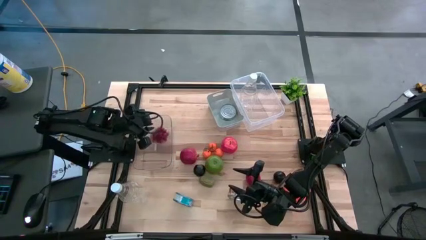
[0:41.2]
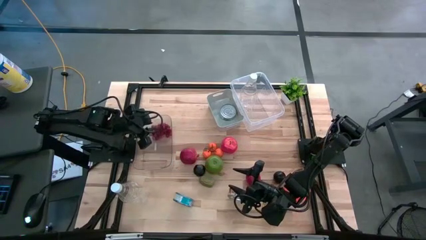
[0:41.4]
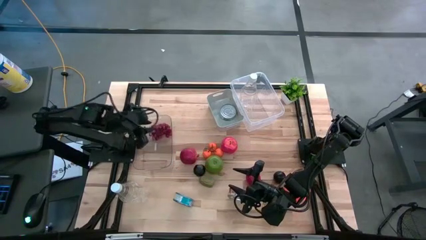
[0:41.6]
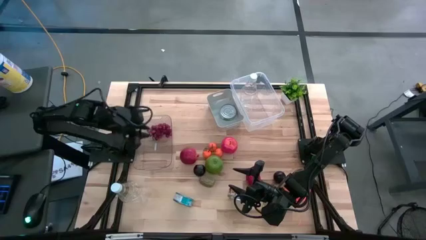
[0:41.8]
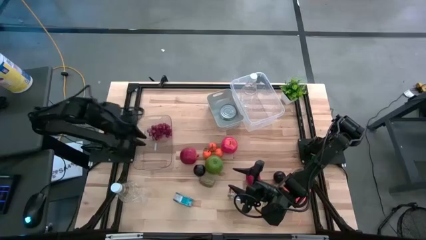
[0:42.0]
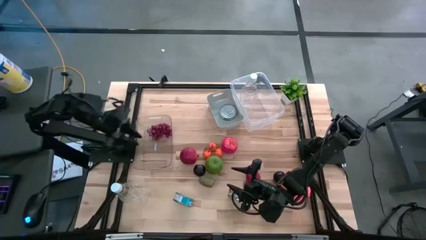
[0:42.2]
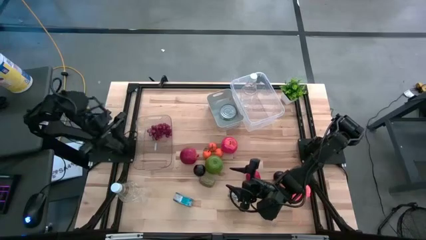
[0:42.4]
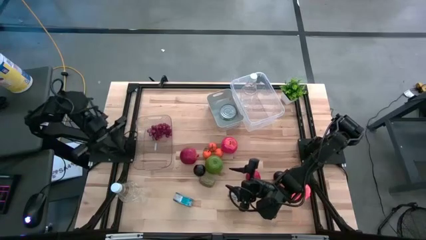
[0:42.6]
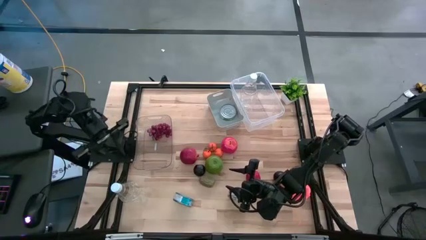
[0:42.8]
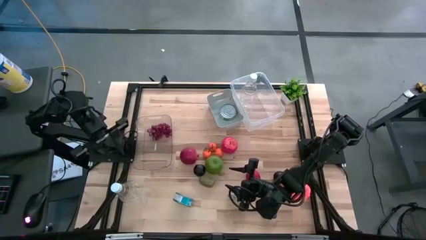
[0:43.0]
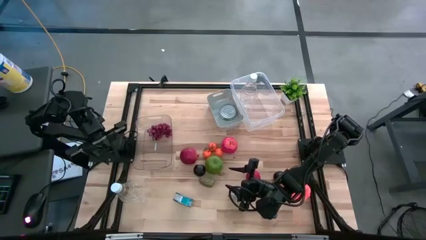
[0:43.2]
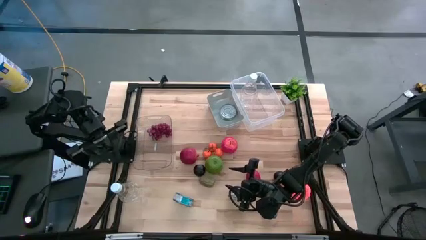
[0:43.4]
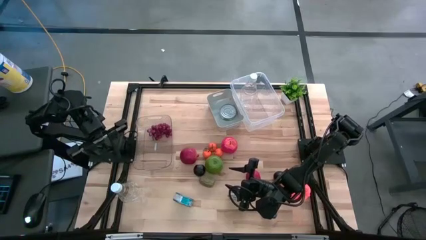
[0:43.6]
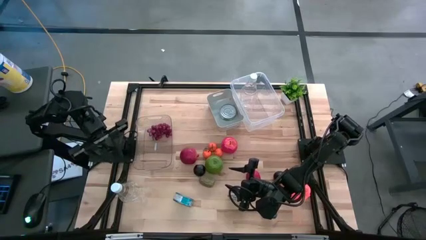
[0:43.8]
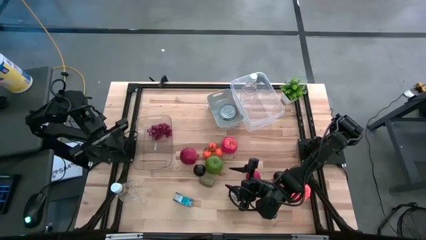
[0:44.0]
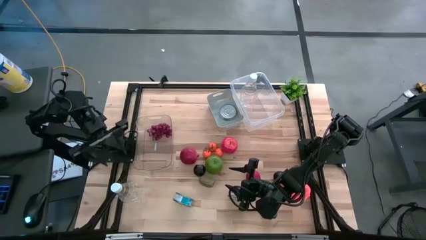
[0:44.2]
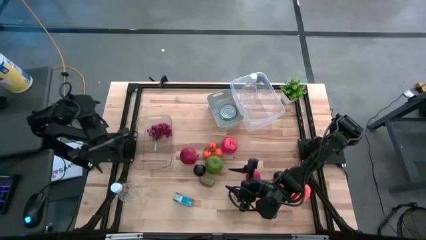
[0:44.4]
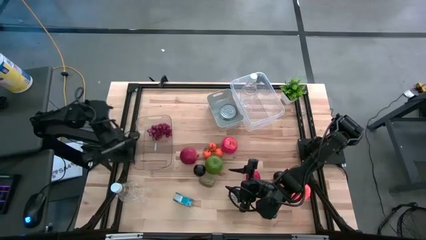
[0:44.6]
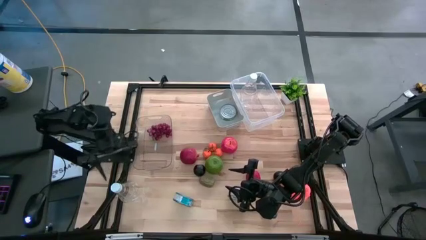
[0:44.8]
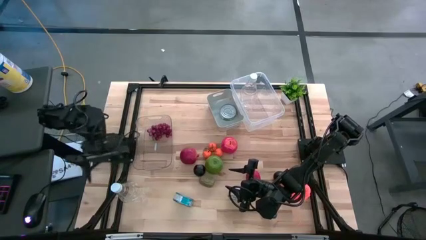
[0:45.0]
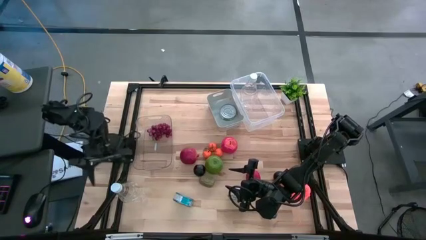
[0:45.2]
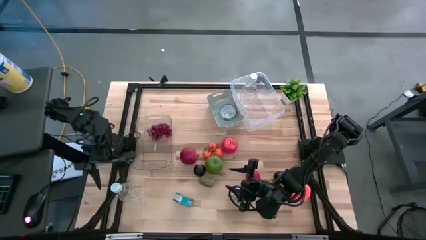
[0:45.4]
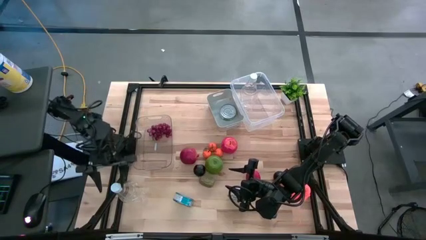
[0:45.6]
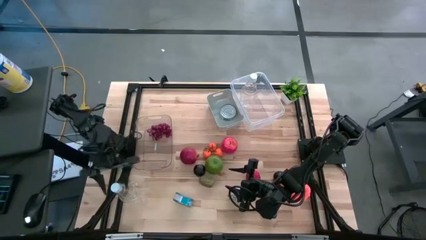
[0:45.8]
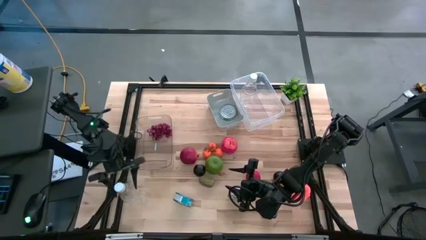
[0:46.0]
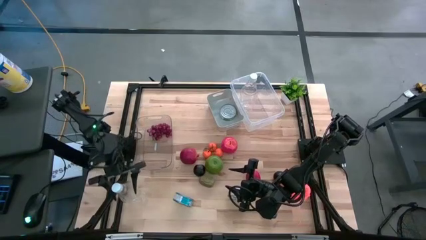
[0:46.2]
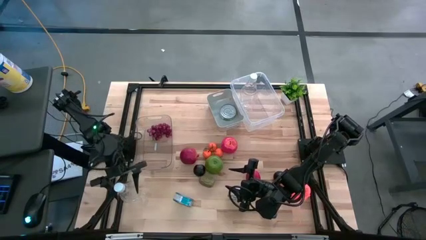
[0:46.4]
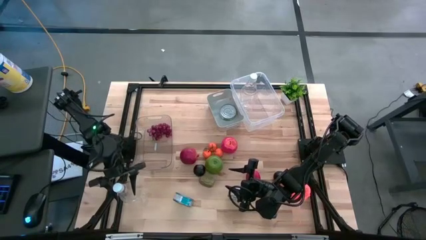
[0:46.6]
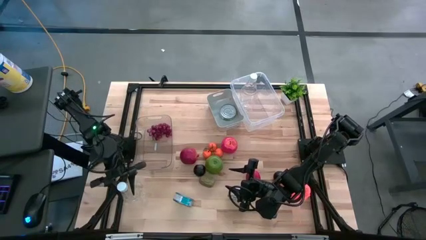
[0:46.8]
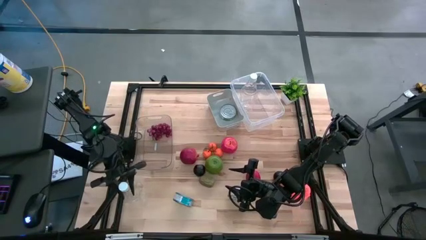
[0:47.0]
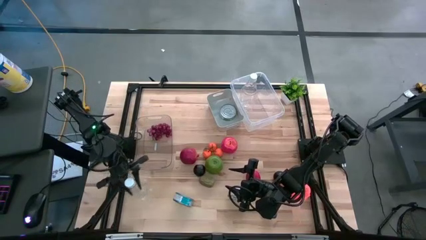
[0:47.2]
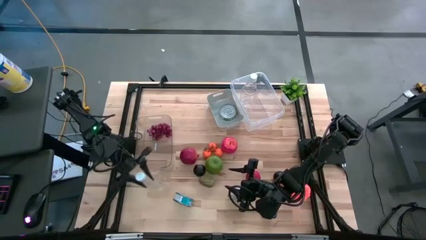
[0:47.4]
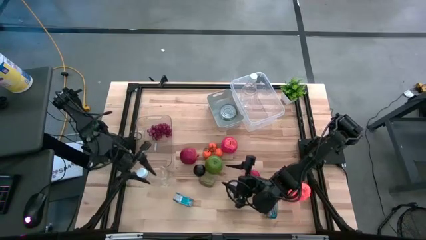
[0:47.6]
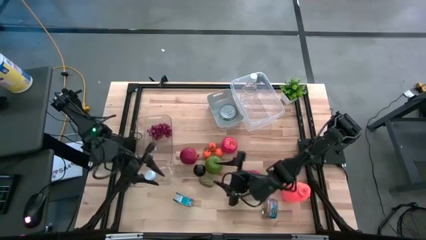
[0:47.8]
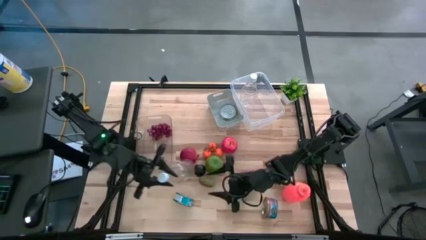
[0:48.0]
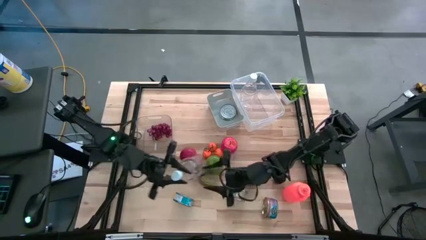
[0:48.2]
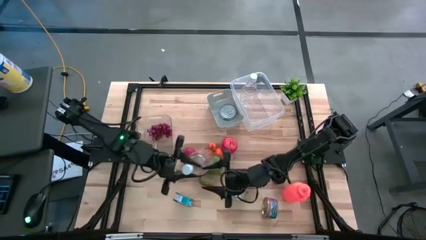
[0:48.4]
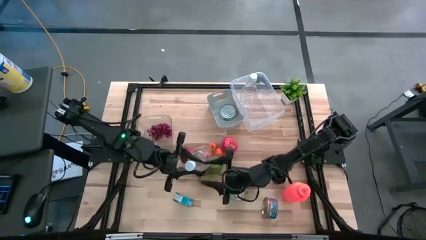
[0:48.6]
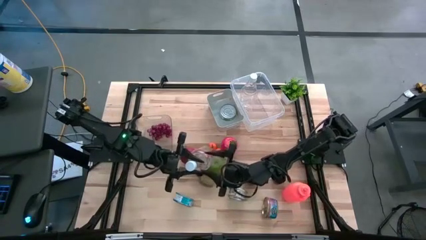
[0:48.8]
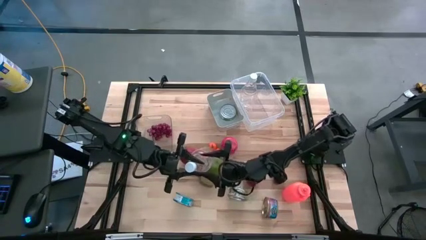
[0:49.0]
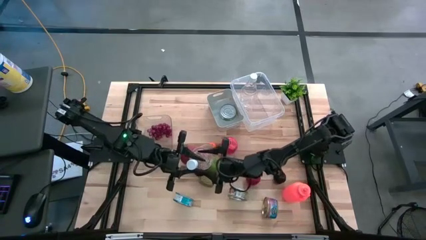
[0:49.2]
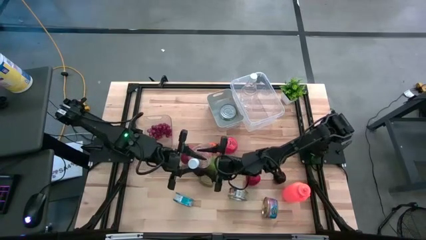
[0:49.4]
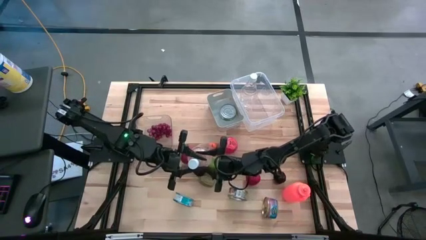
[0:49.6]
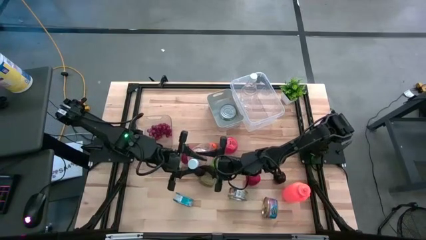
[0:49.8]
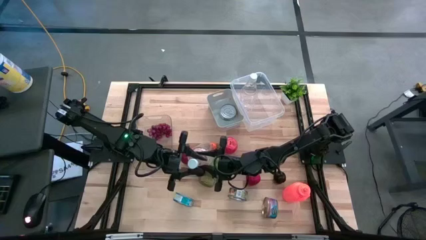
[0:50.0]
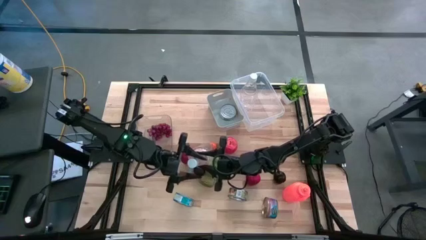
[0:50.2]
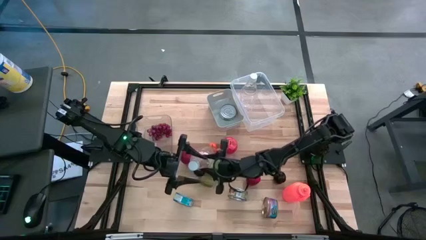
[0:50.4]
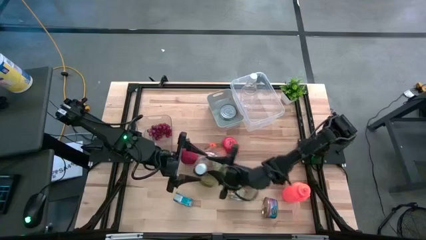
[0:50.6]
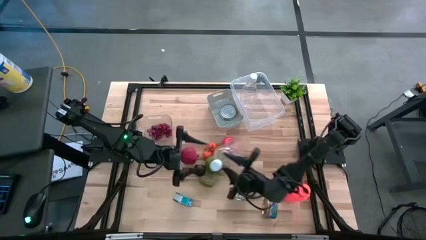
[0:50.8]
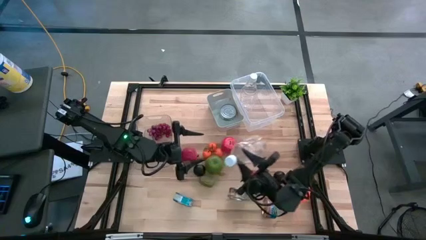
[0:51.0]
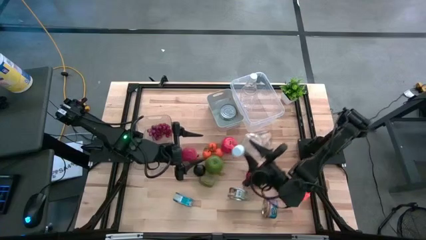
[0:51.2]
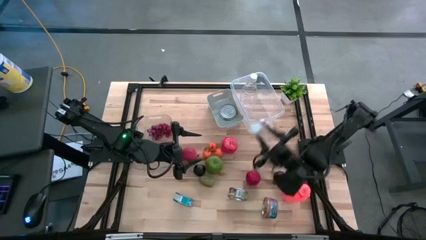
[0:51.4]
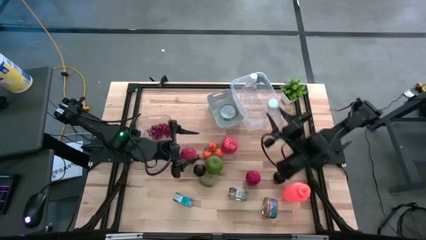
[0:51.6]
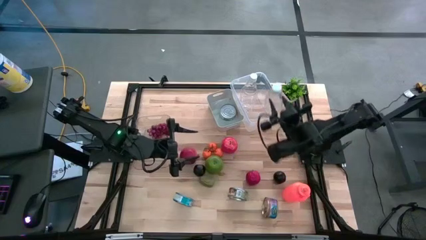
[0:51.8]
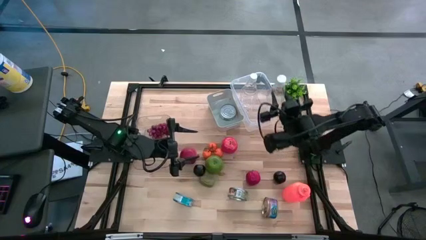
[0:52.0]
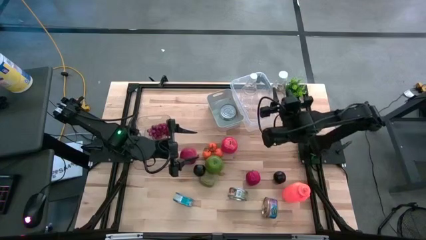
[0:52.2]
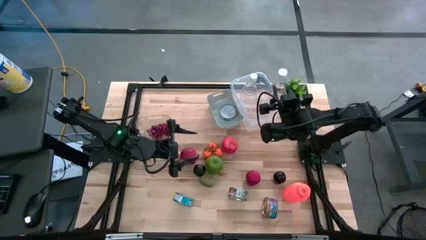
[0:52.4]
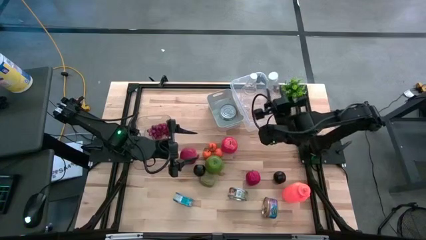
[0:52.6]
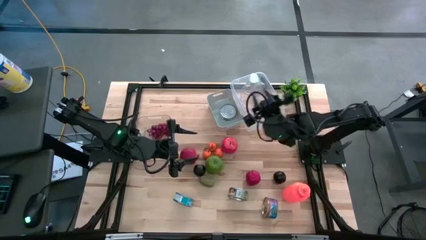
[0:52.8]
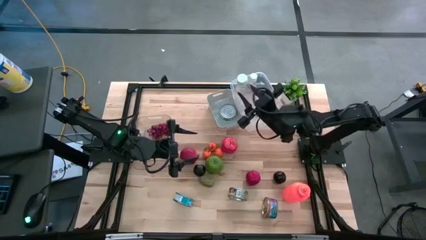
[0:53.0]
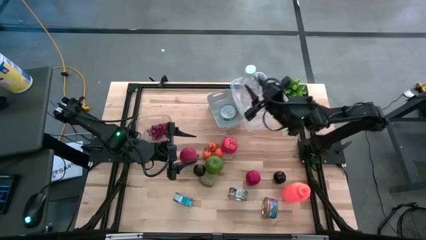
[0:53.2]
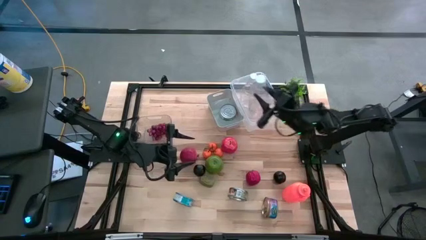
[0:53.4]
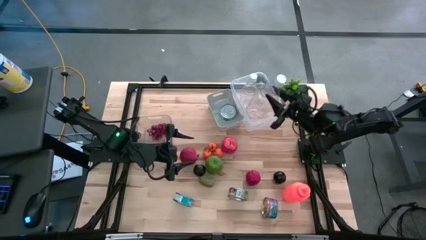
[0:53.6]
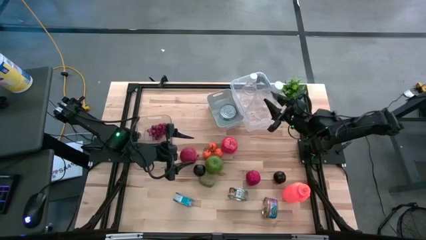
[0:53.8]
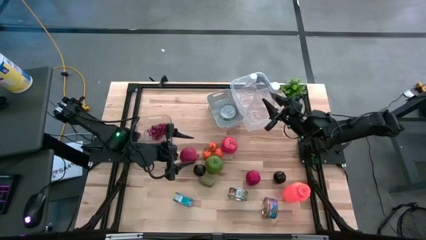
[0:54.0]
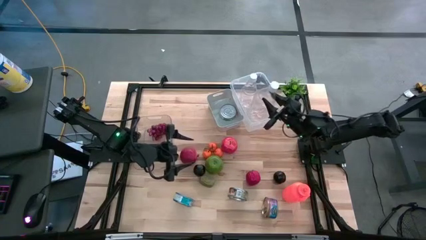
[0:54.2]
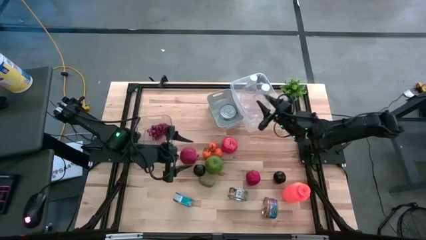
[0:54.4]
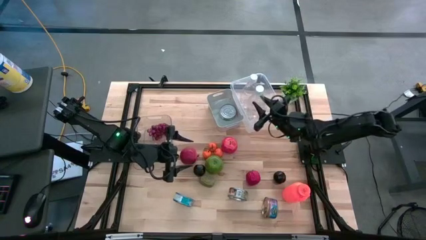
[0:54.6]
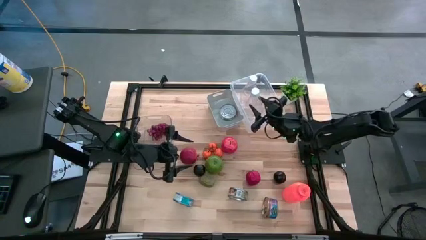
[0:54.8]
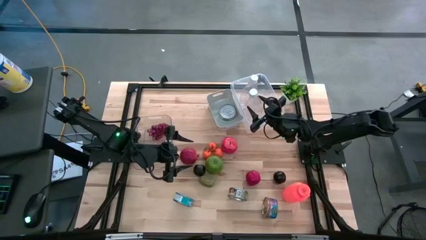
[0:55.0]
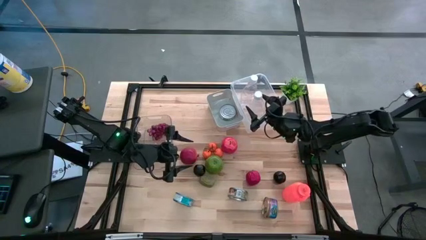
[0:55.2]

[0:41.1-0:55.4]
Task: Pick & Place Food Item
Put the transparent bottle into the right transparent bin

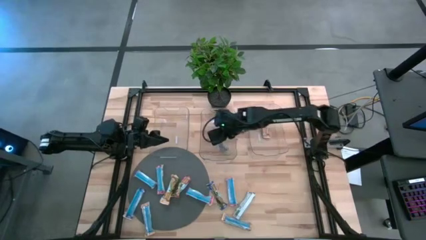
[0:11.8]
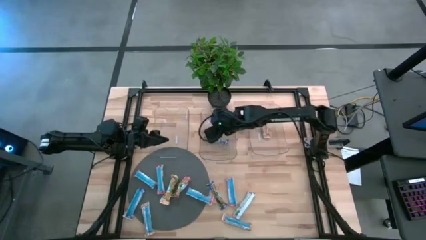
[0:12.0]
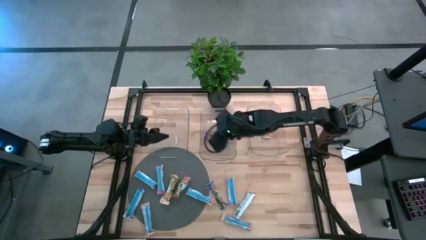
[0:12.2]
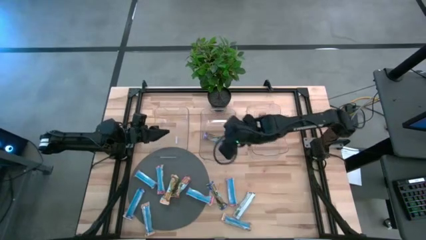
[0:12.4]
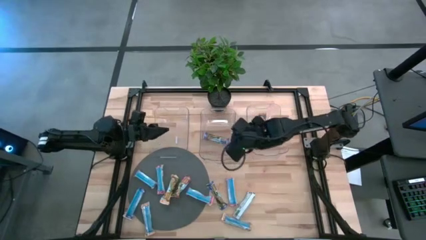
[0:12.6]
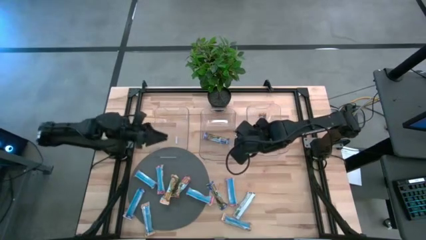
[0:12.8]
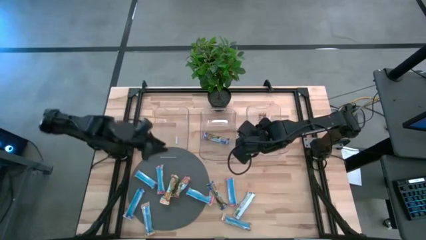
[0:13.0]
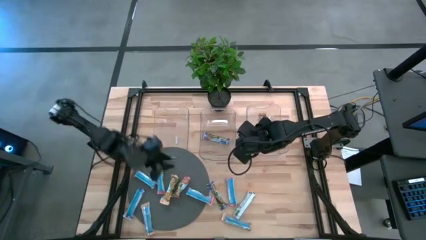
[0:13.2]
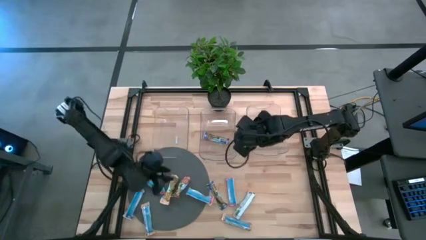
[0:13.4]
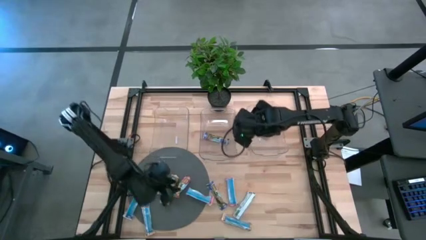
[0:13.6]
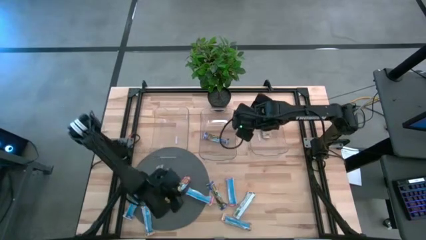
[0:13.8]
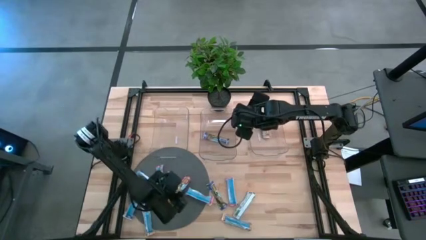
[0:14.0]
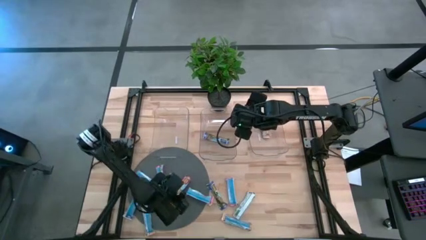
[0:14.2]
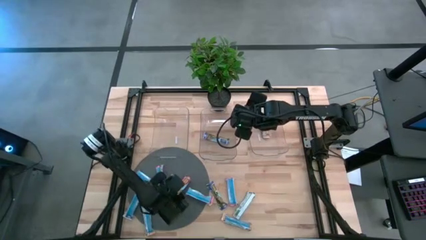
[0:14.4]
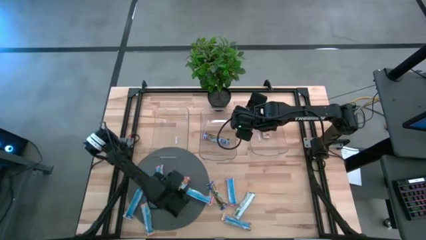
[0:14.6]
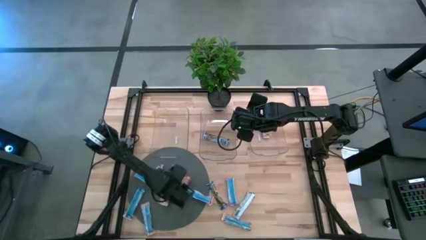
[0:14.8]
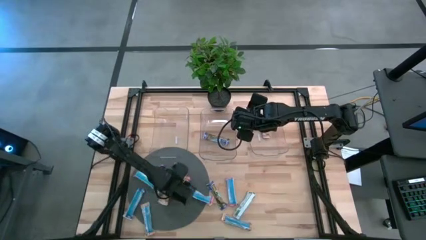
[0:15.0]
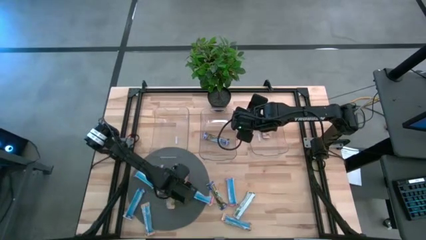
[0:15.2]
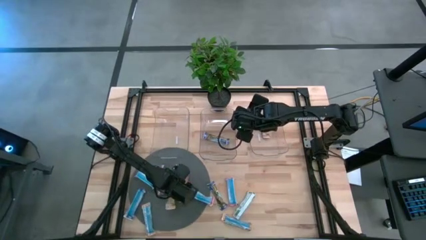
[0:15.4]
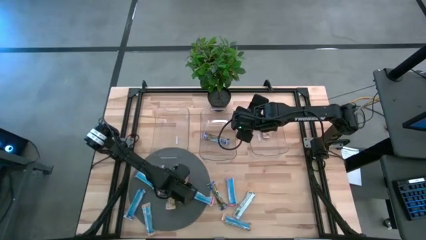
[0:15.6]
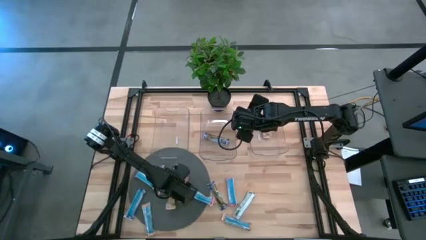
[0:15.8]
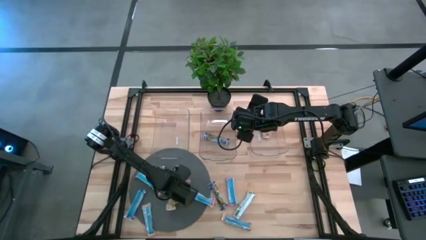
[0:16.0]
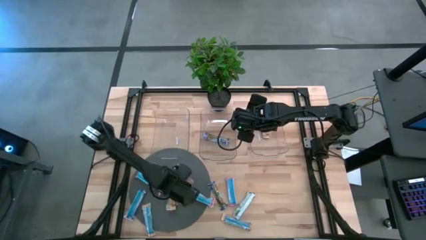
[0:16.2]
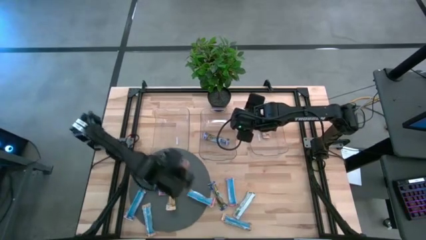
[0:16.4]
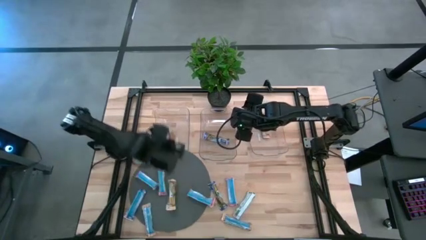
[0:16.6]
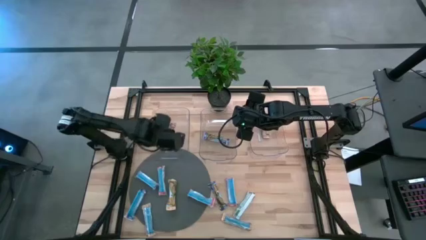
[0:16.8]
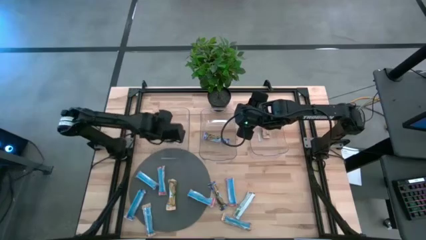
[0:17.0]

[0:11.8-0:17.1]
Task: Pick and place Granola Bars by type
Put the red granola bar into the left transparent bin
